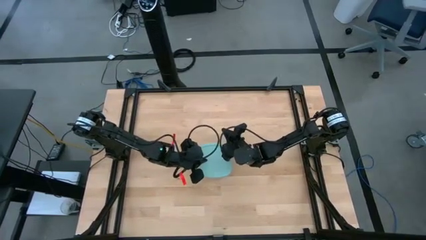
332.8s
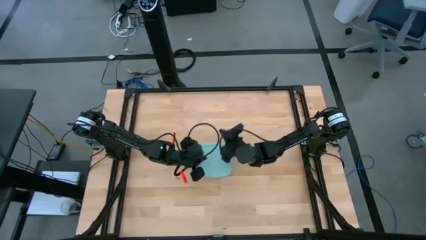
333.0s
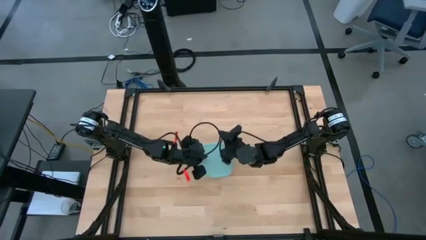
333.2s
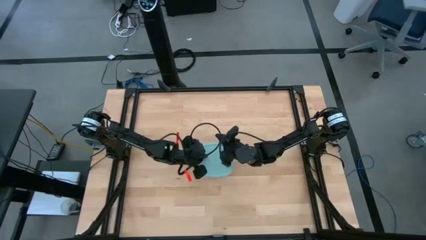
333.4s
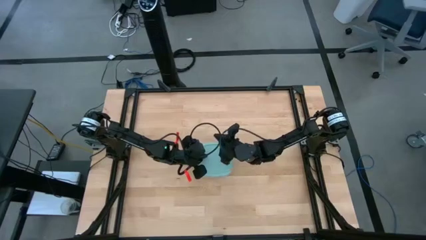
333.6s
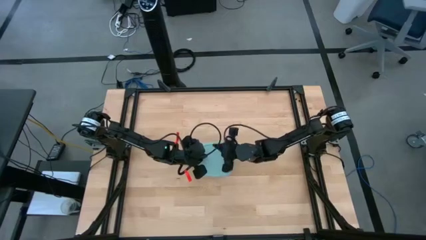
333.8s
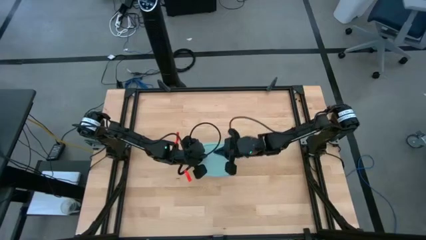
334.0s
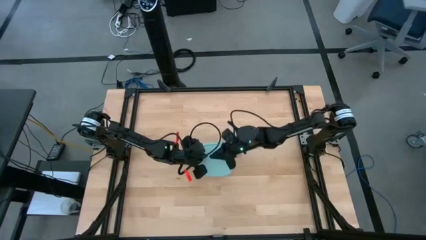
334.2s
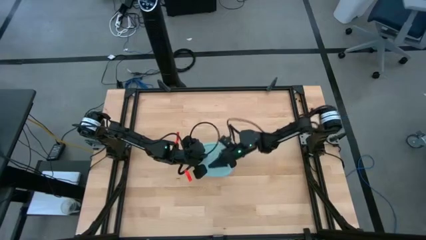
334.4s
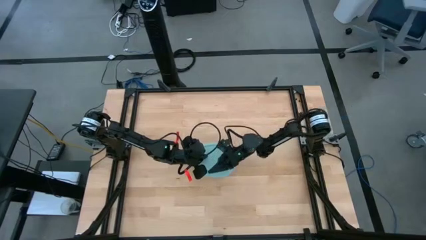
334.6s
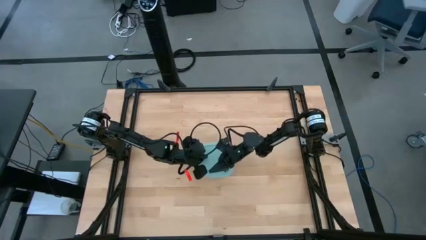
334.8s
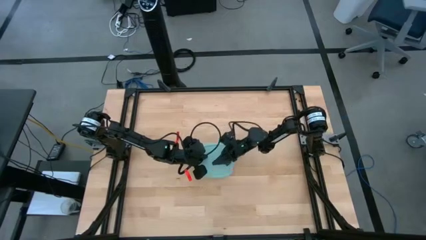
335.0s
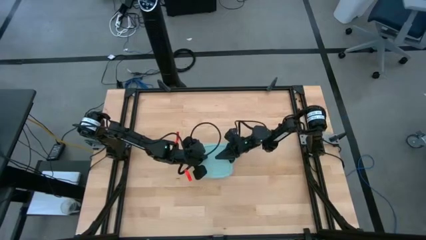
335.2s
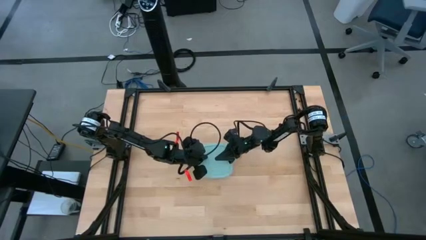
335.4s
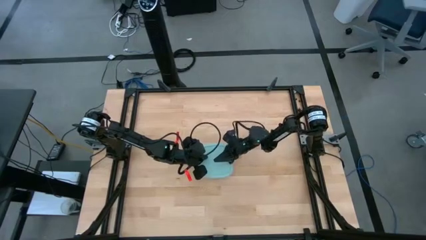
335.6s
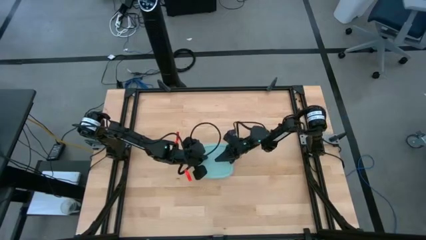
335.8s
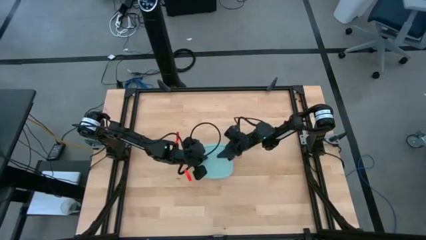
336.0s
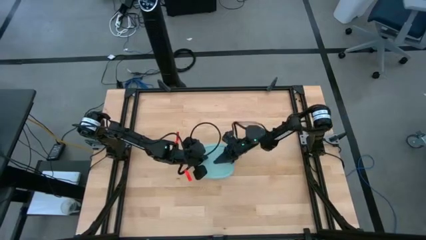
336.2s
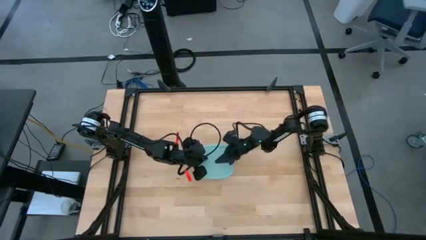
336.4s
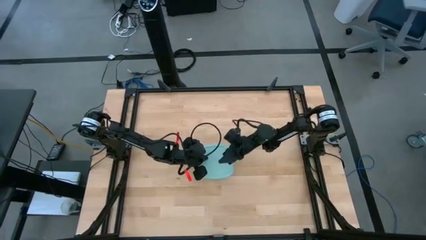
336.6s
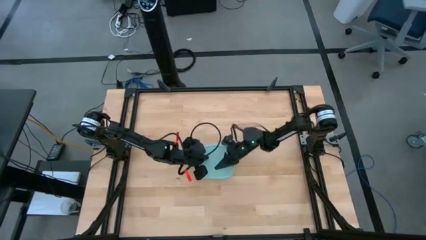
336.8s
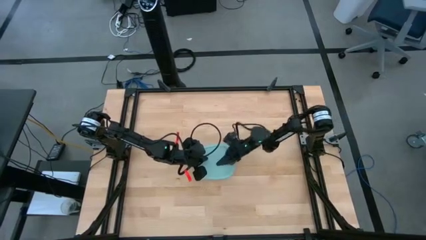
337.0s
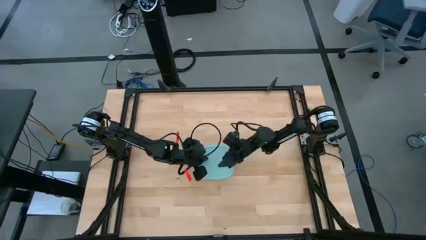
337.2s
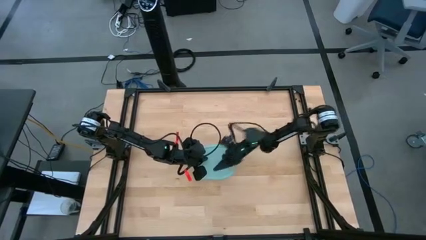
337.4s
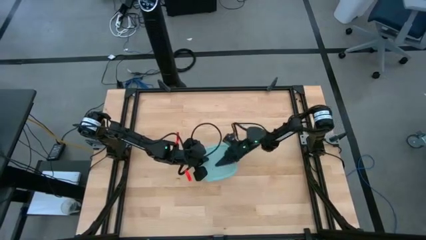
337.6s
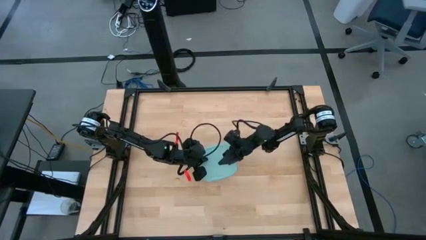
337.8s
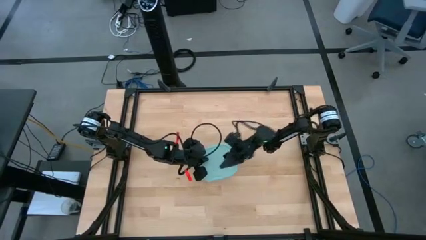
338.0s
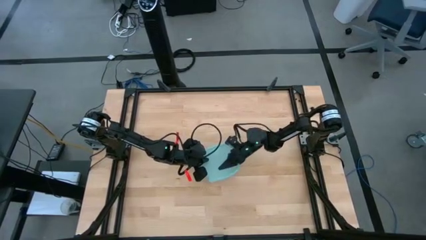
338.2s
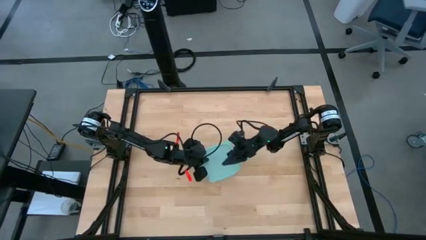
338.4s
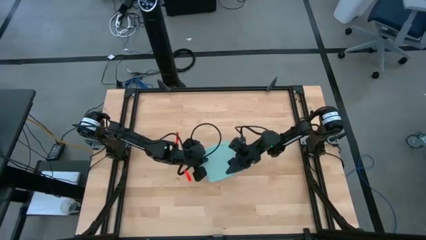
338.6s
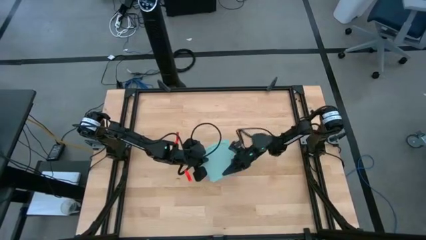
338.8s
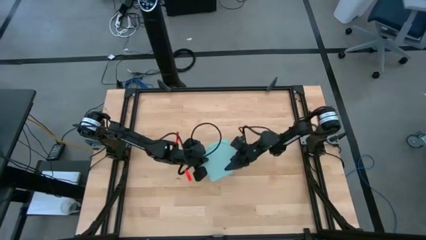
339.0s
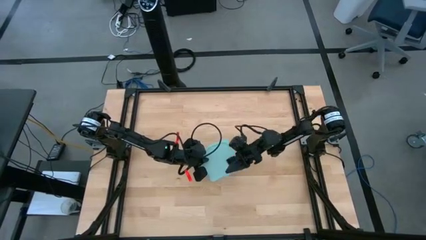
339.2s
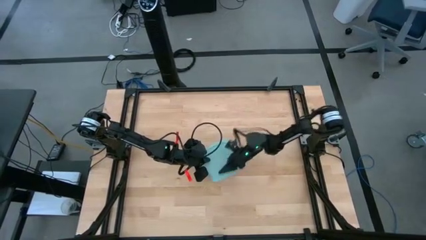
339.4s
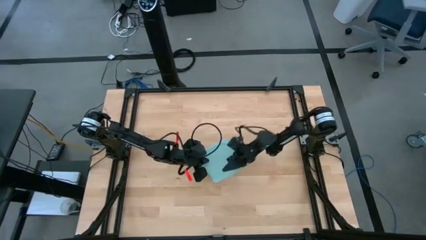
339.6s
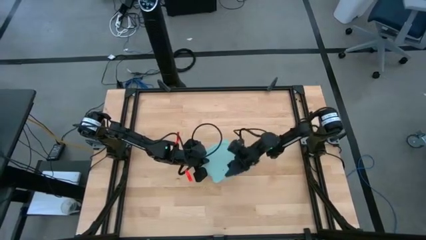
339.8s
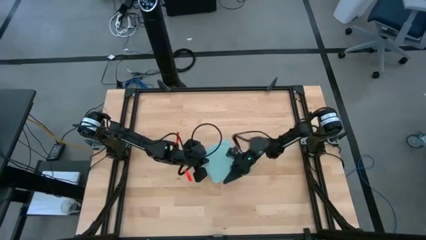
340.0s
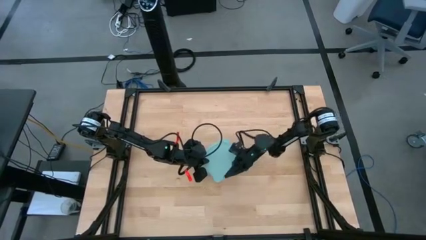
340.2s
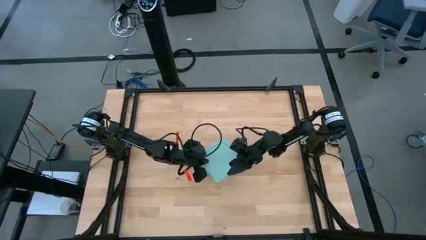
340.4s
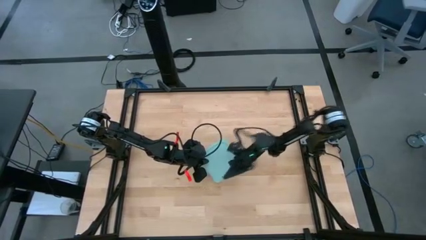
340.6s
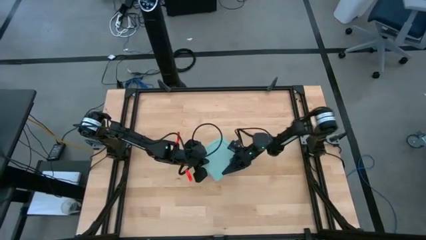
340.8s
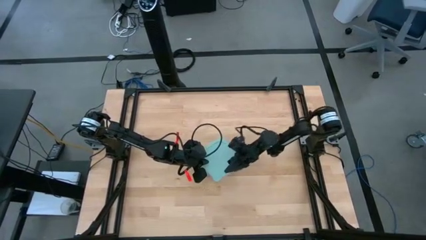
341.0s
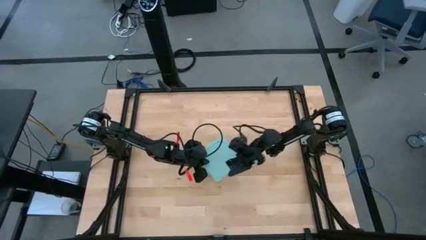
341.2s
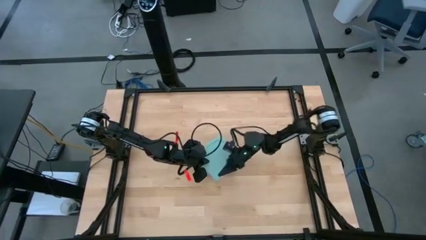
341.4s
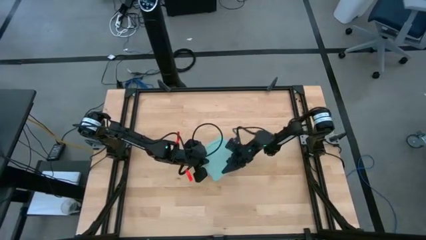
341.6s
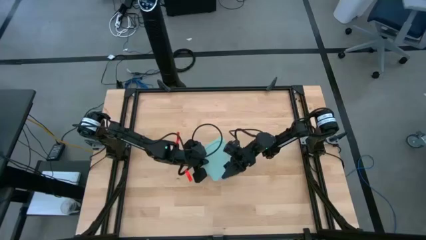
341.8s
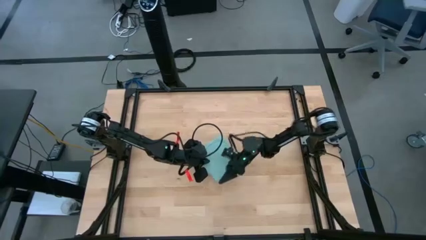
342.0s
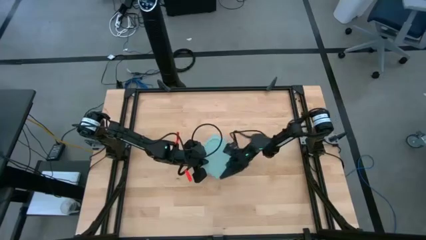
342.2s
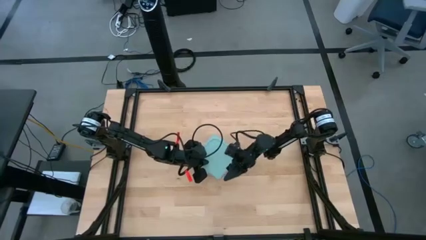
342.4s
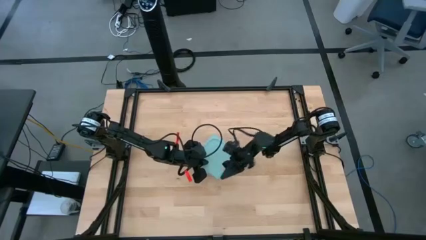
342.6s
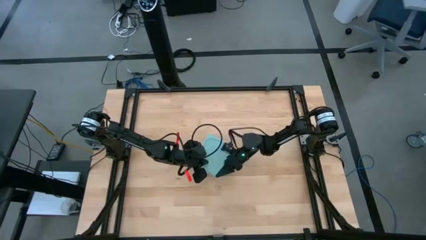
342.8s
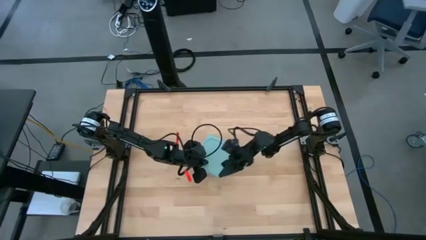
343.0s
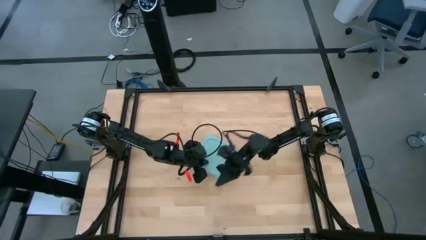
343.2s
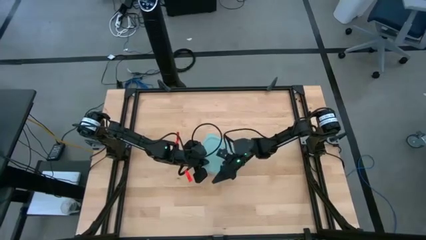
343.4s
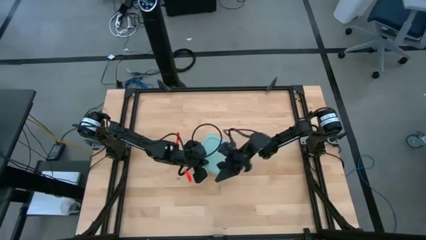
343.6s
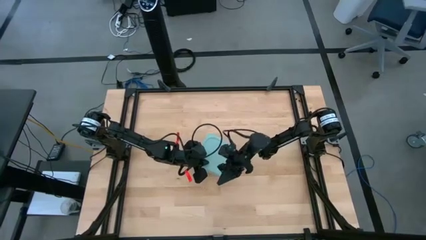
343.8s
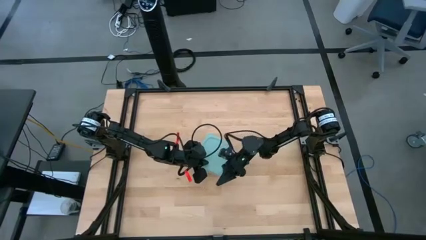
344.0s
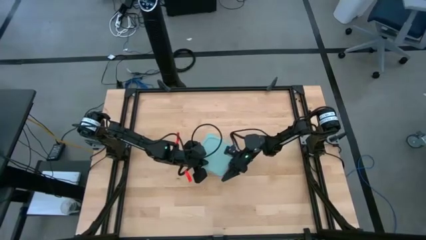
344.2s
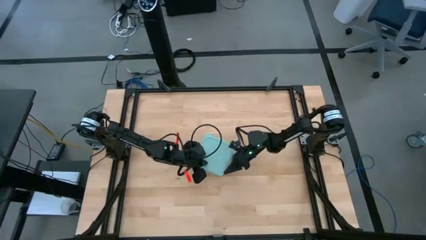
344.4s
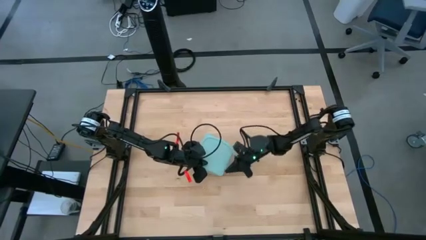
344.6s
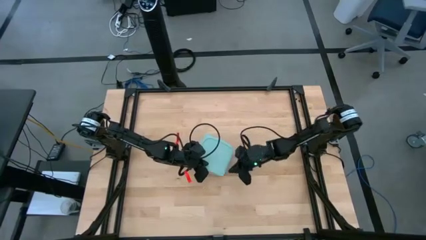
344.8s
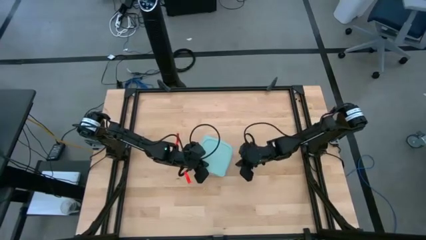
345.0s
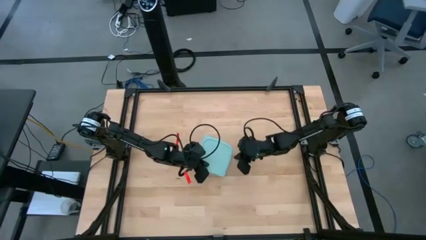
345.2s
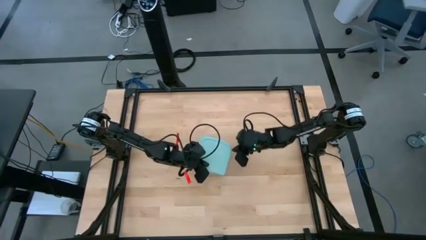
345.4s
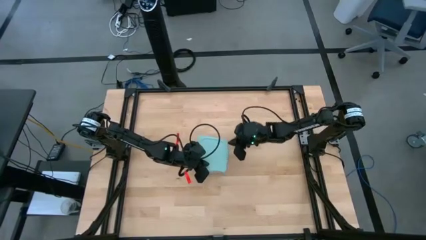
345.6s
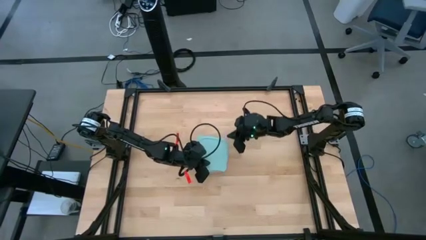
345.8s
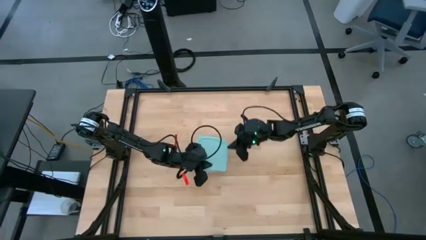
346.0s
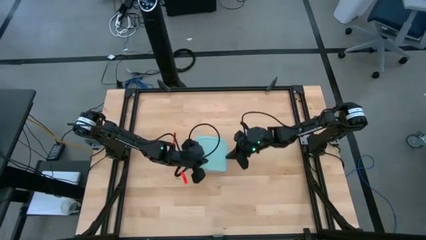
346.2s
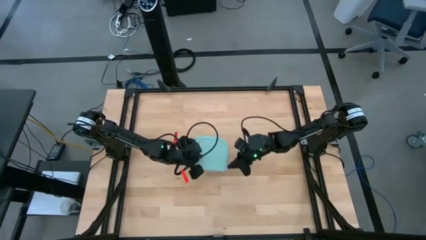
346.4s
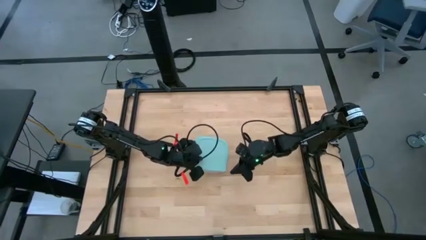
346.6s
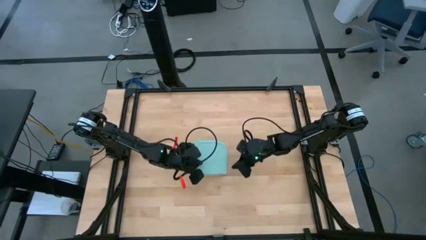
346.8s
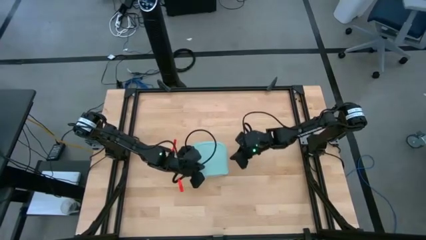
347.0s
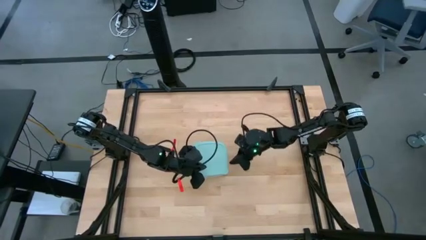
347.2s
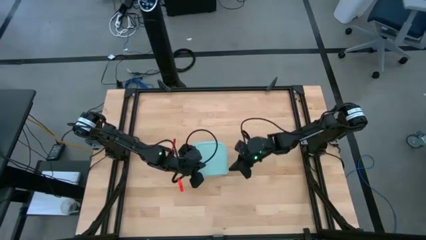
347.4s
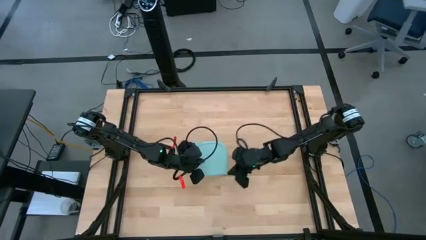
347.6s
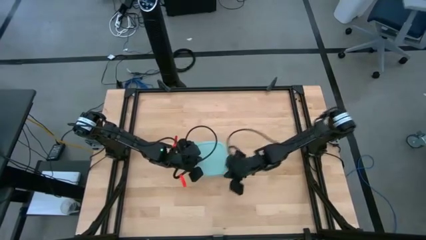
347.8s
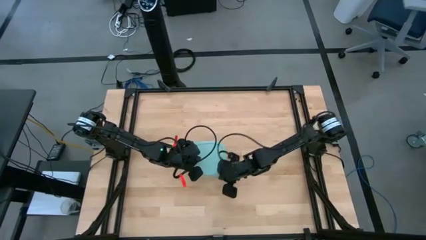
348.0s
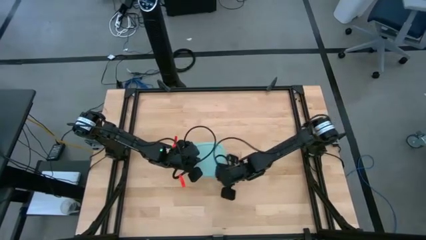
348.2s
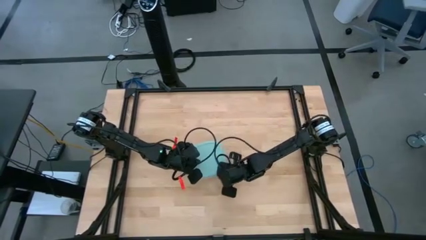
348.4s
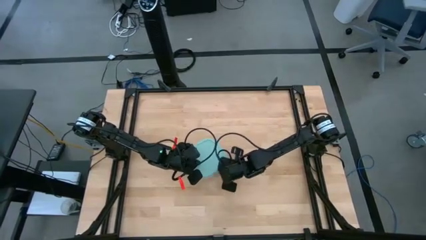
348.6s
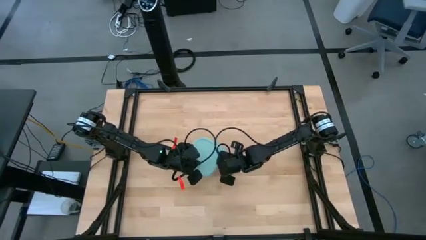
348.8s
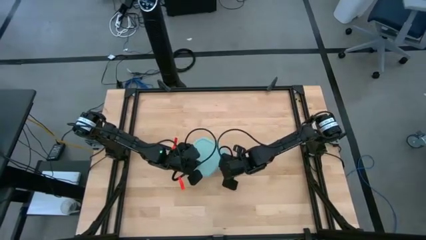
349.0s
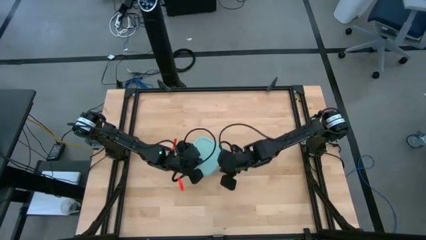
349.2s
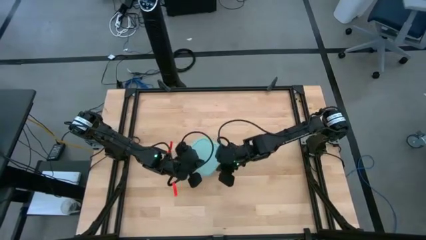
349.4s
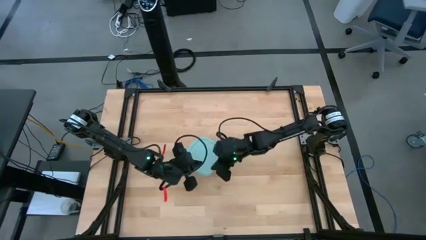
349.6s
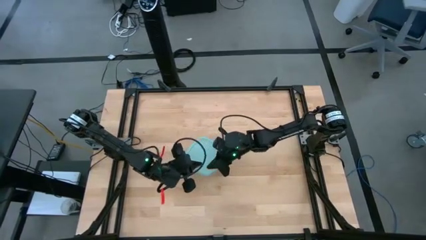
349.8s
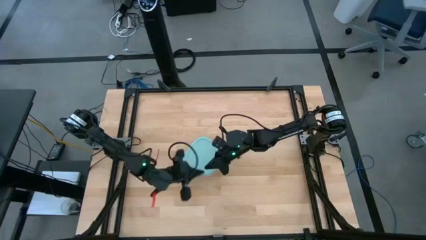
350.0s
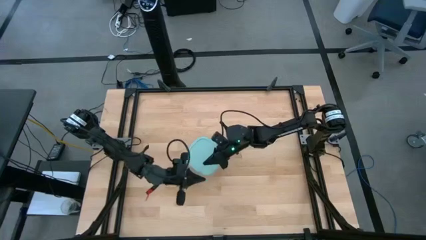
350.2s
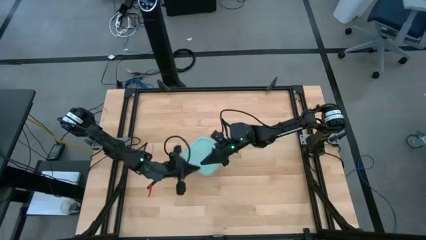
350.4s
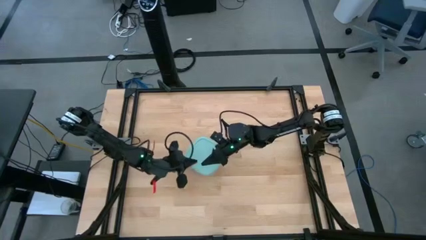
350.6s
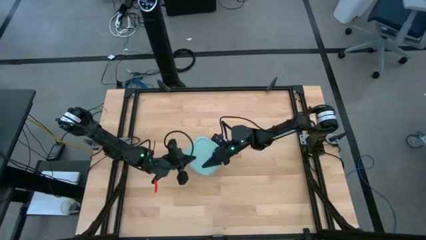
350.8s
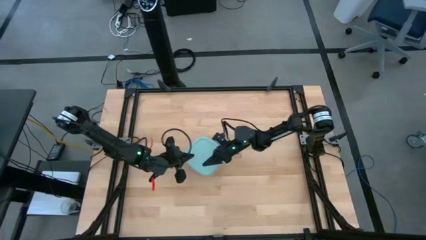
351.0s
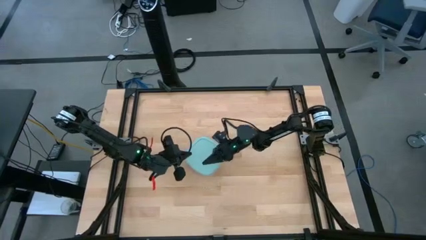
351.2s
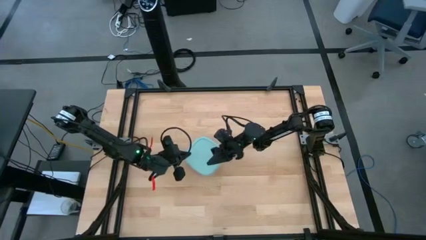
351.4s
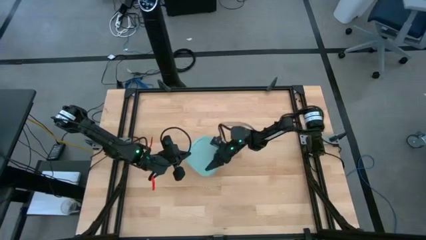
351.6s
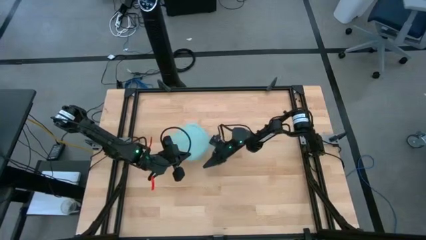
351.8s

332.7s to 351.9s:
Task: Roll bandage
Close the transparent tupperware
